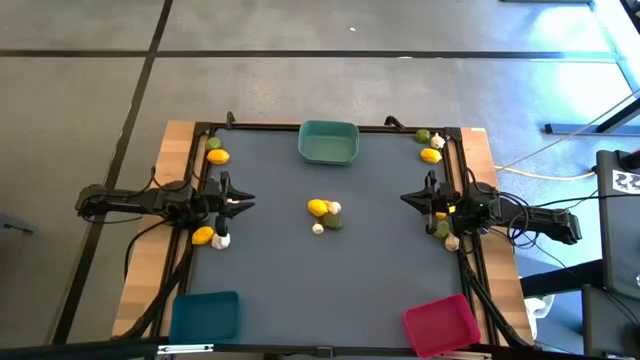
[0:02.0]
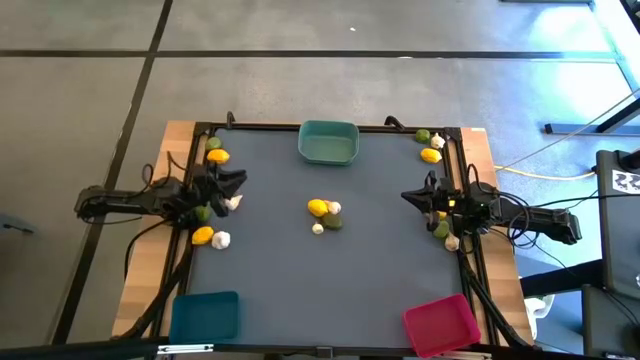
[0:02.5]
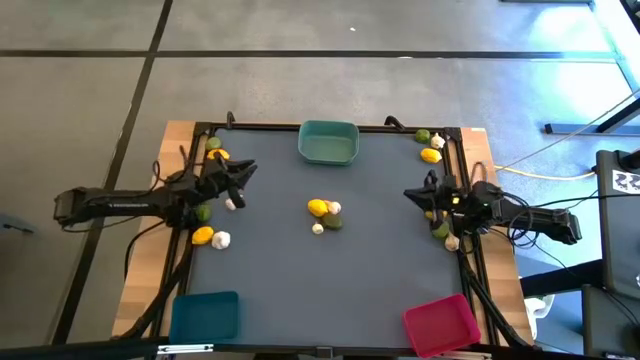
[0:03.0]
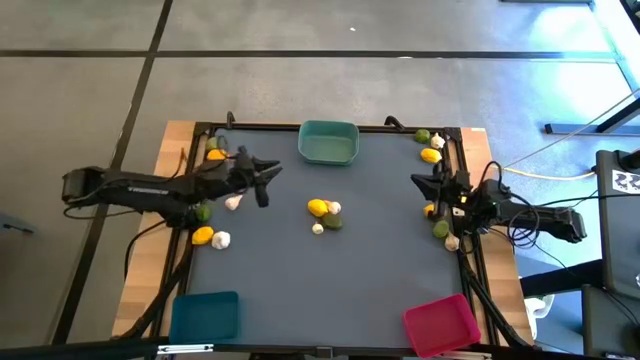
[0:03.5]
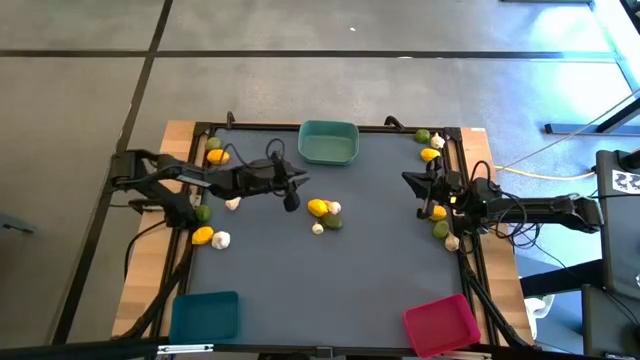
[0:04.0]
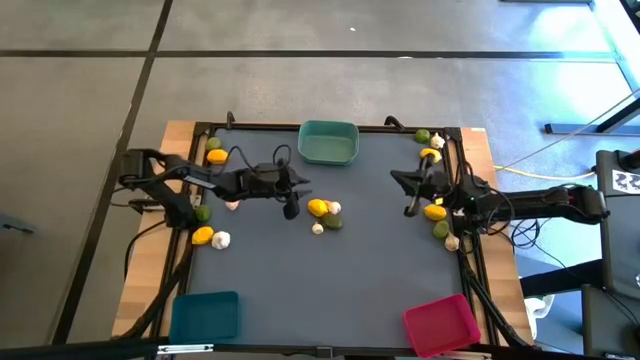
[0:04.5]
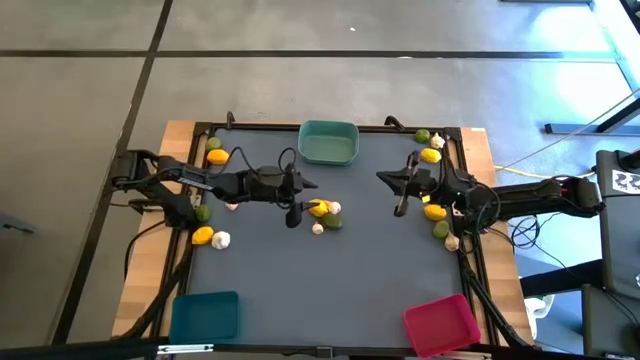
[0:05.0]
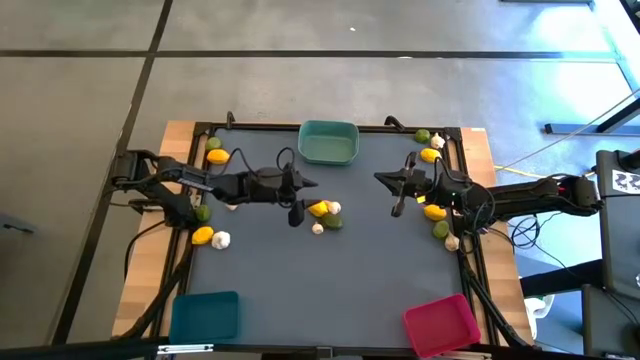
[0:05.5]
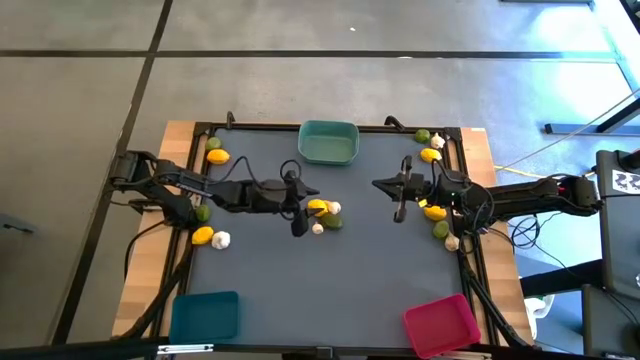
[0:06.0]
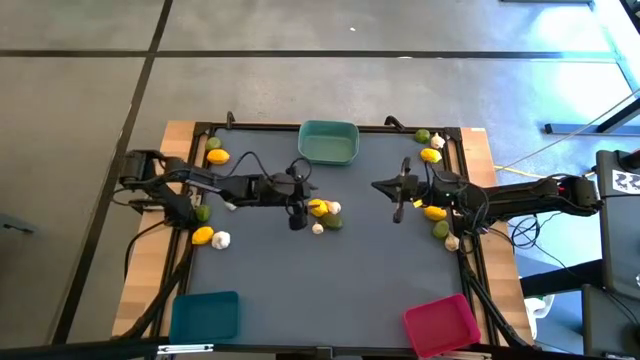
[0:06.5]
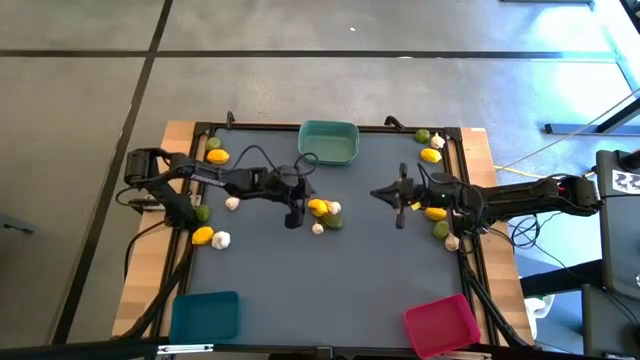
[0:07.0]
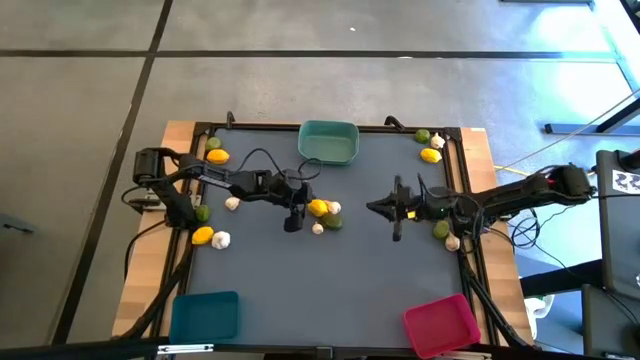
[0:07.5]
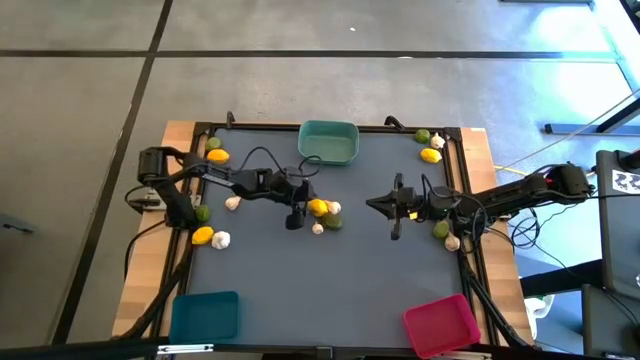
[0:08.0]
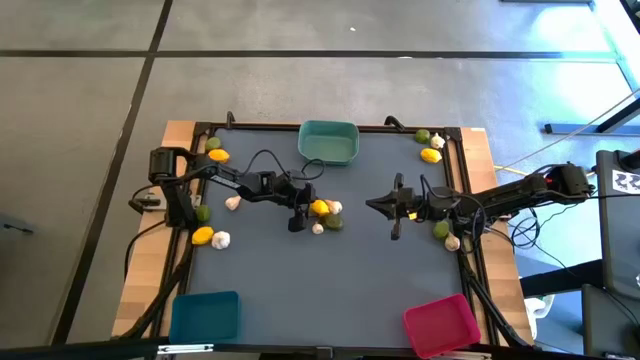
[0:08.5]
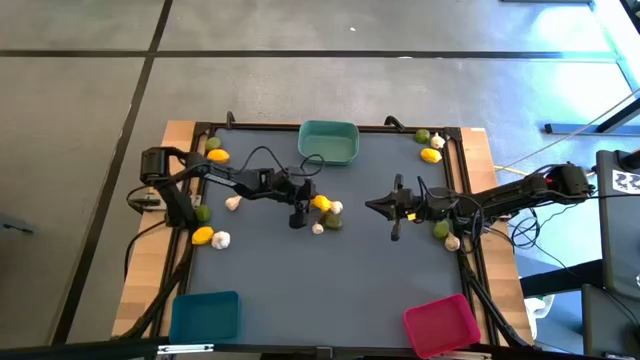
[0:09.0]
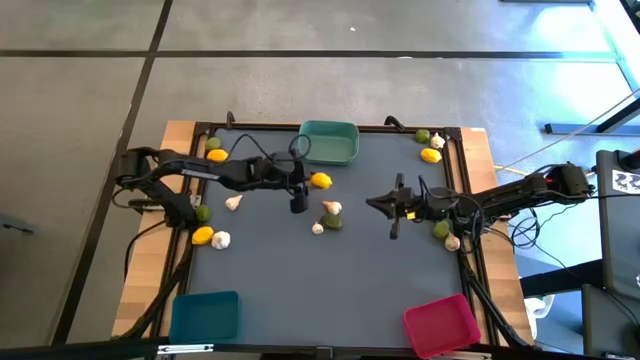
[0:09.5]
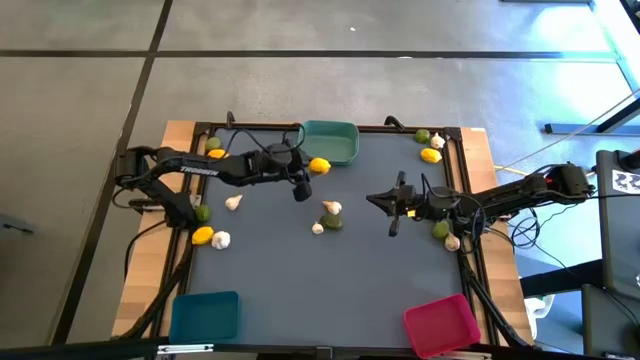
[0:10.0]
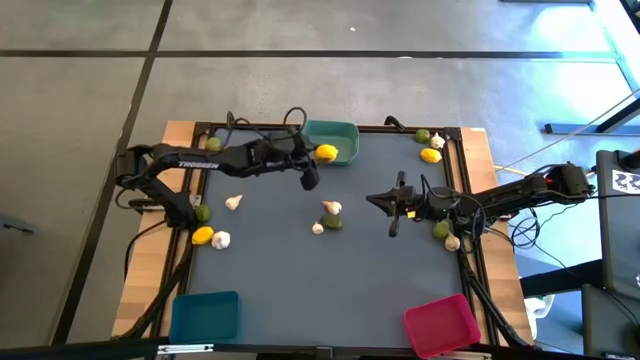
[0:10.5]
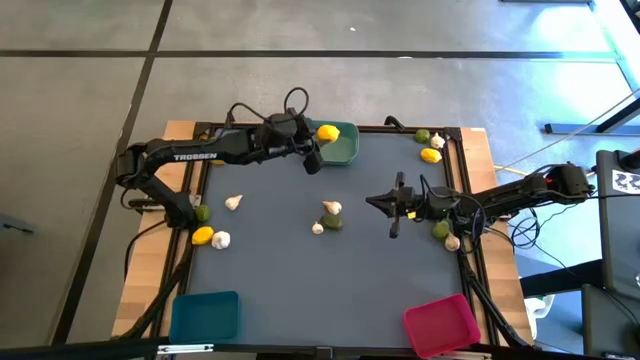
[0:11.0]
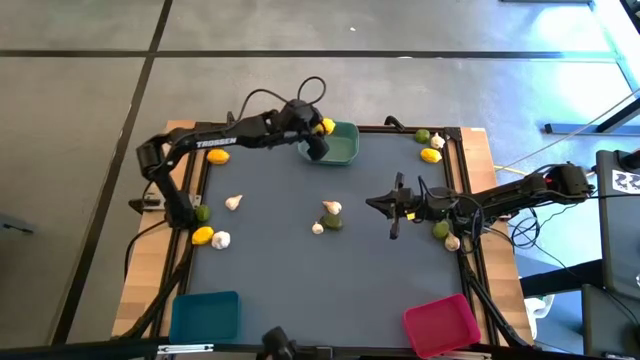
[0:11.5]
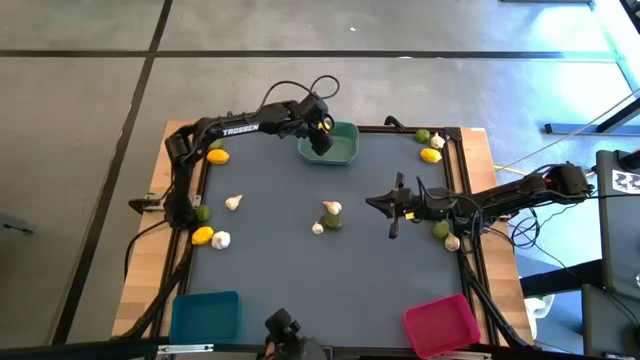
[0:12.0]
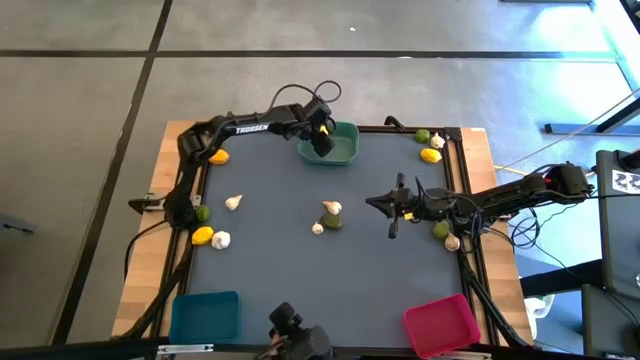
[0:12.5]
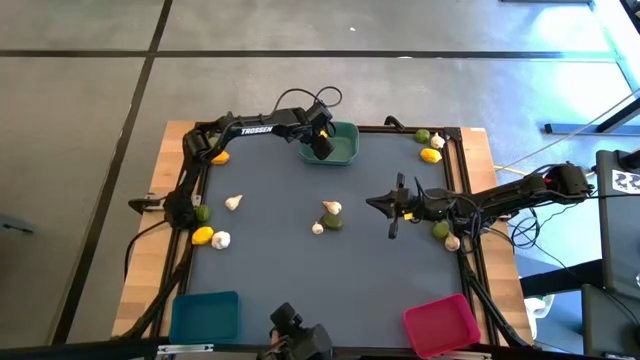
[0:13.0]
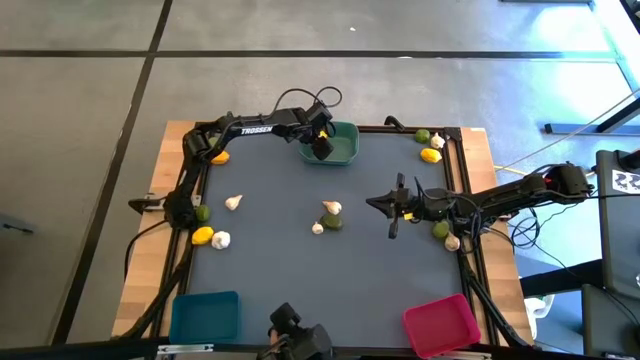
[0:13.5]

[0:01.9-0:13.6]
Task: Sort produce into baskets
Put the green lemon into the green bin

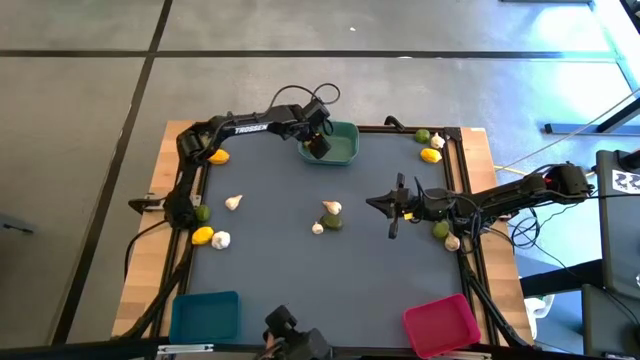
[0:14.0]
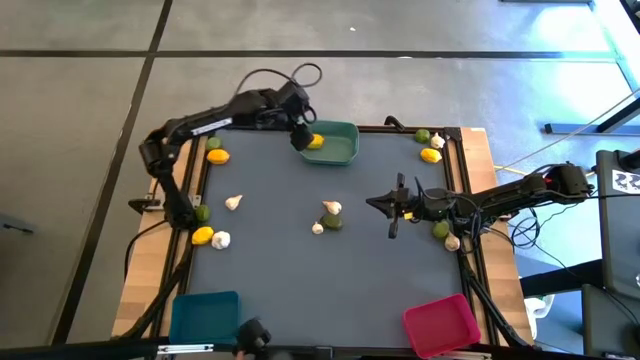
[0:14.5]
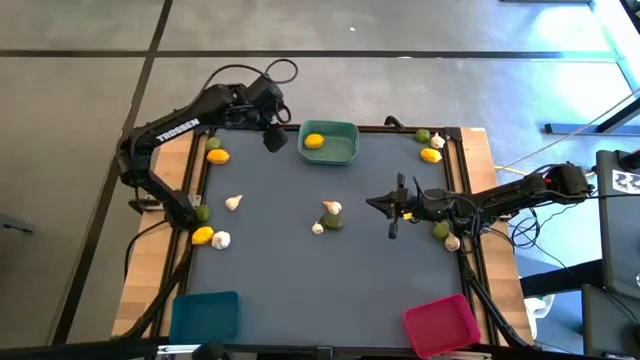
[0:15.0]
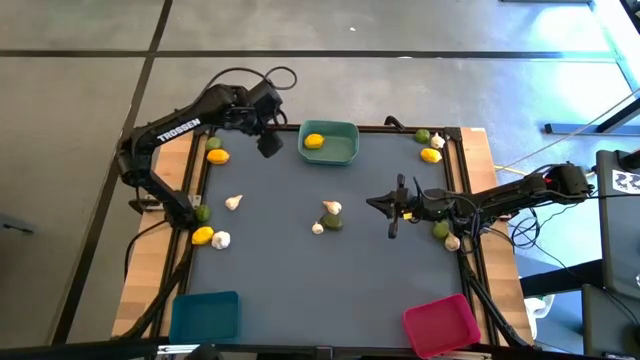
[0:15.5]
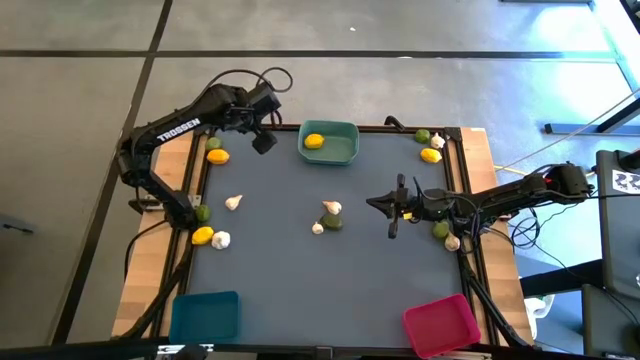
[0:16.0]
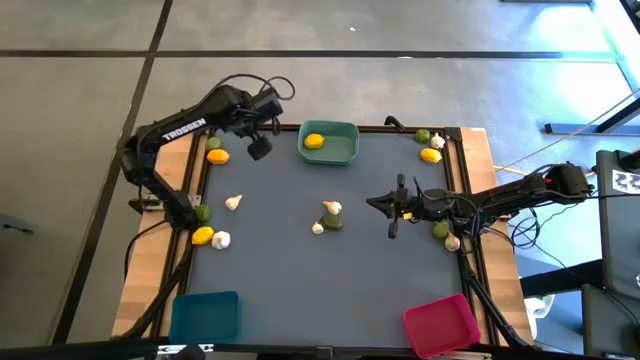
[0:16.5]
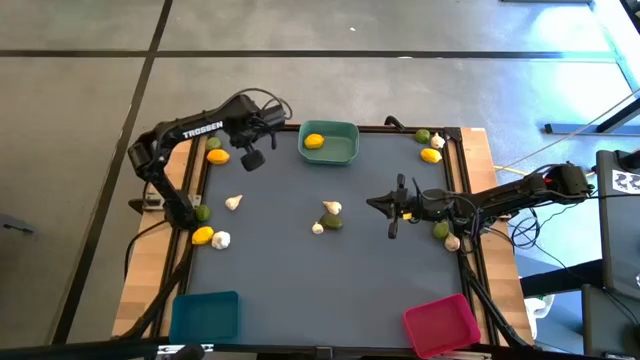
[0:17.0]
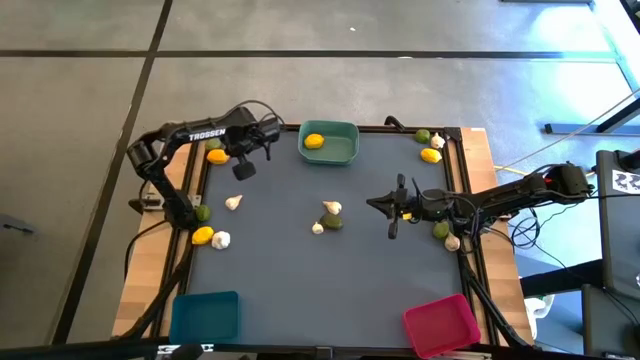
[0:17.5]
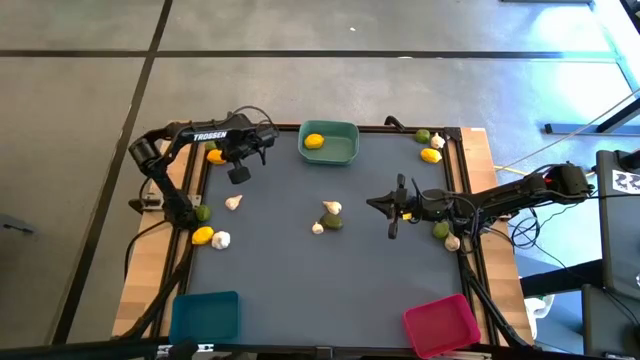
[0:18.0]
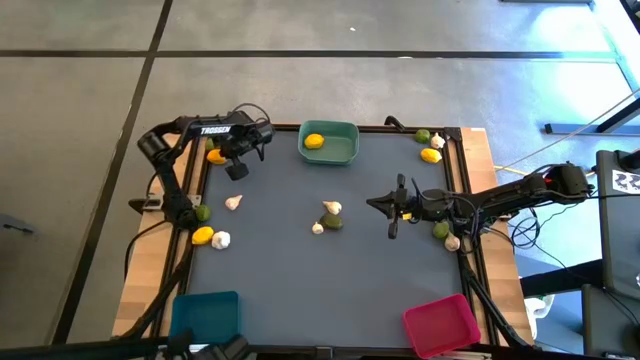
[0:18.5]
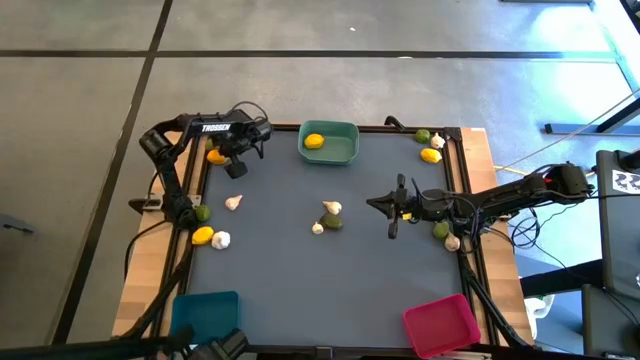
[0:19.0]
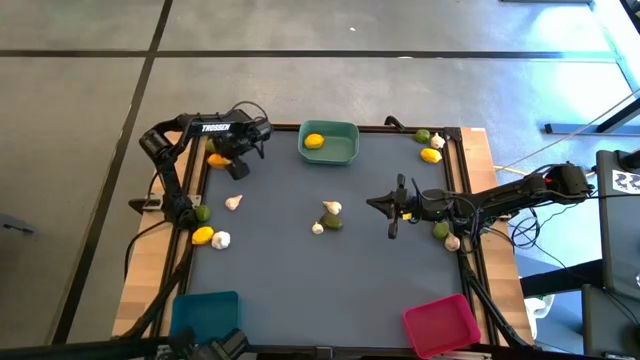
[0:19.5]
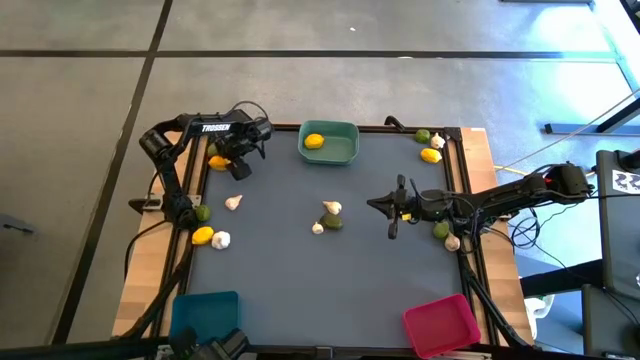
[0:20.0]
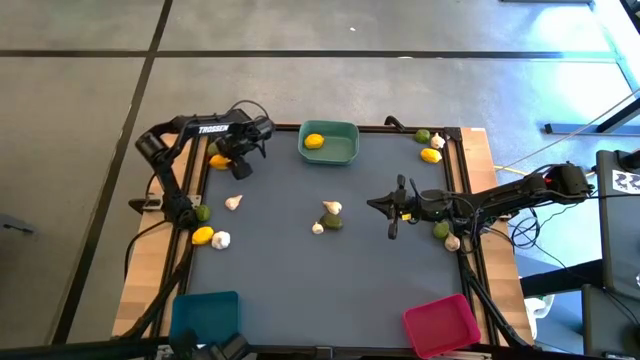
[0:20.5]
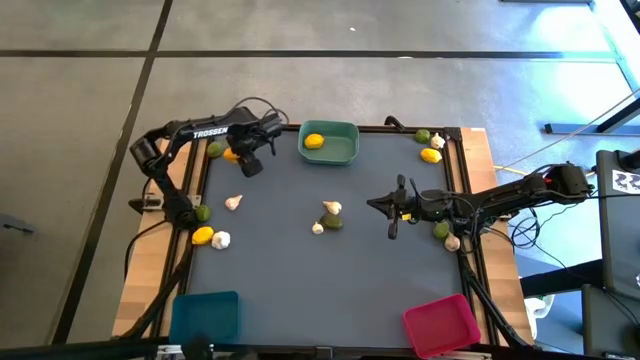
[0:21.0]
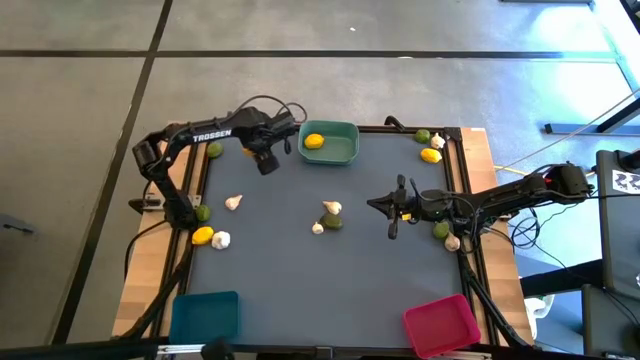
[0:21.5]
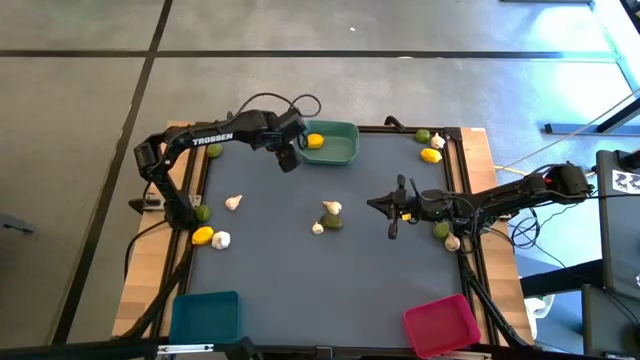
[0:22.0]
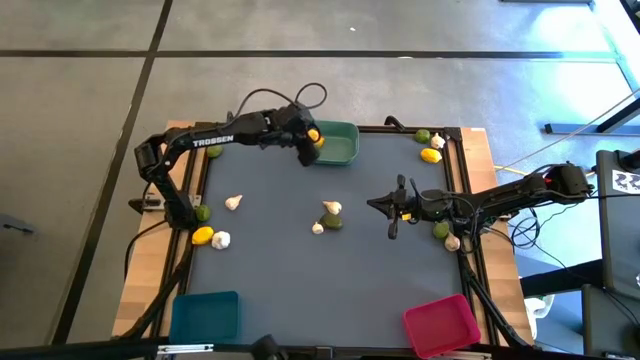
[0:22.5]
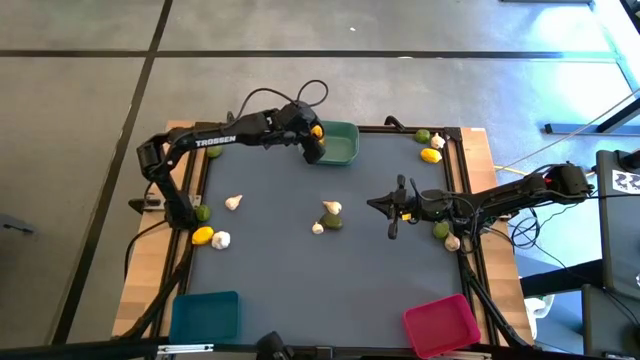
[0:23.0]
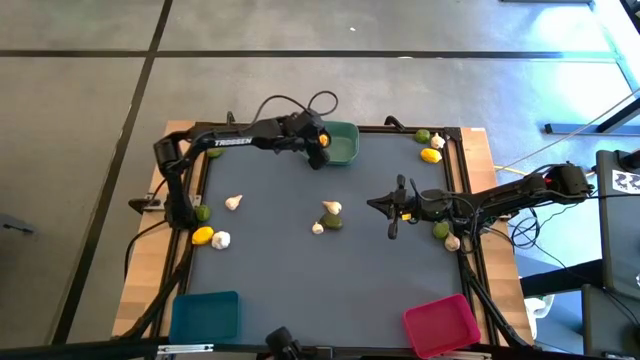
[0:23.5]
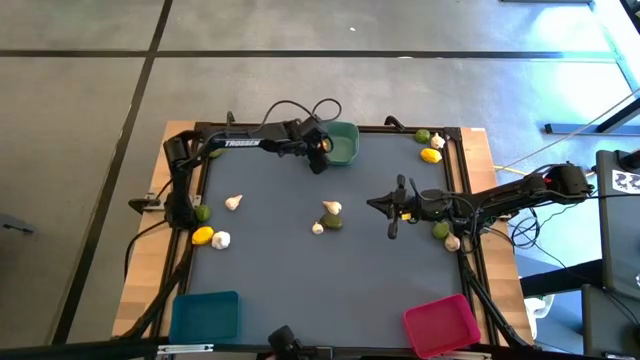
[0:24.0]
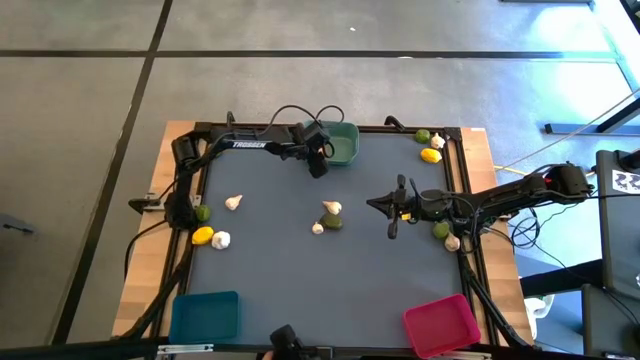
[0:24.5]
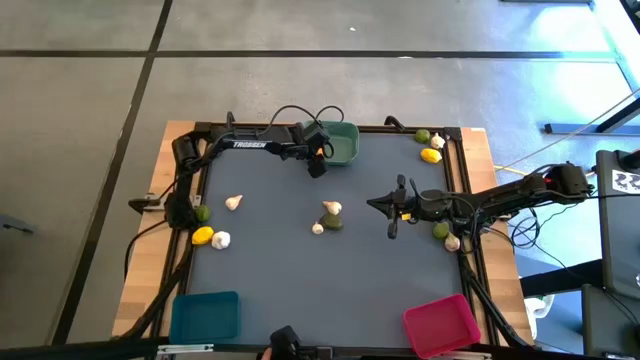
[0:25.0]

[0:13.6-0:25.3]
Put the green lemon into the green bin
